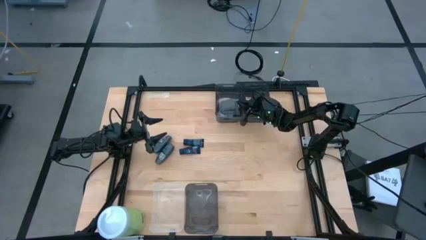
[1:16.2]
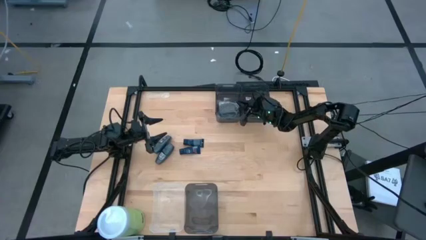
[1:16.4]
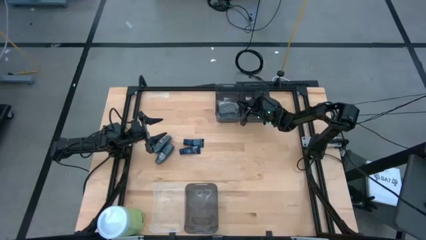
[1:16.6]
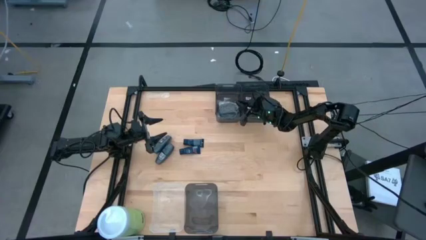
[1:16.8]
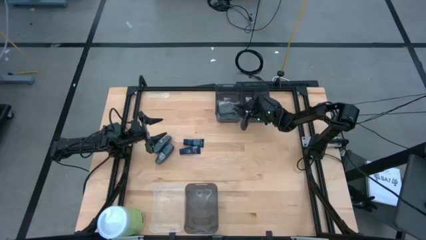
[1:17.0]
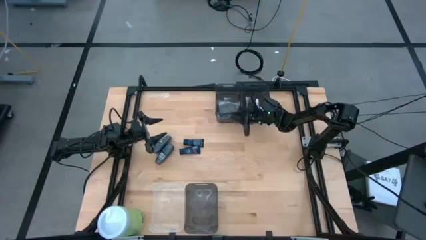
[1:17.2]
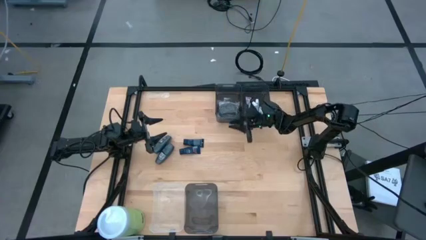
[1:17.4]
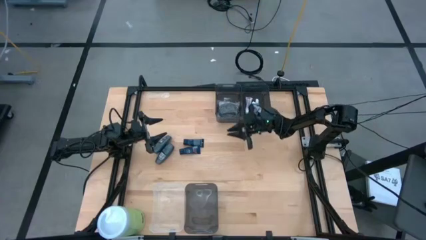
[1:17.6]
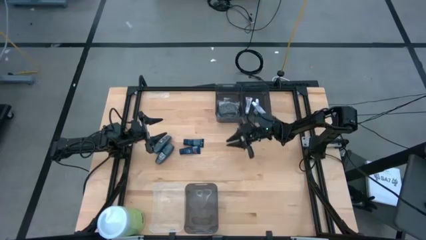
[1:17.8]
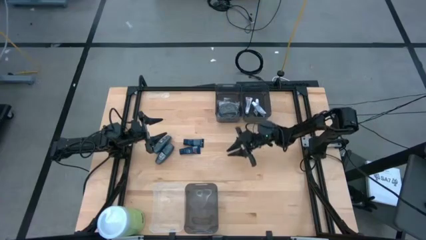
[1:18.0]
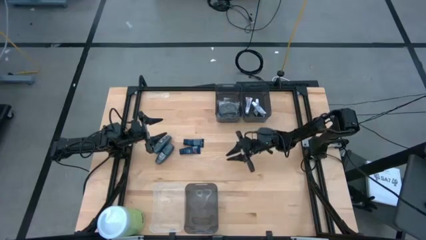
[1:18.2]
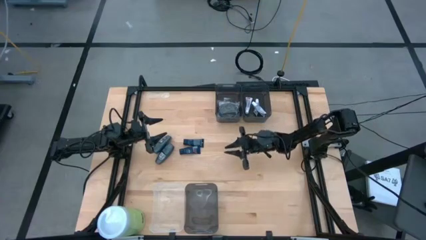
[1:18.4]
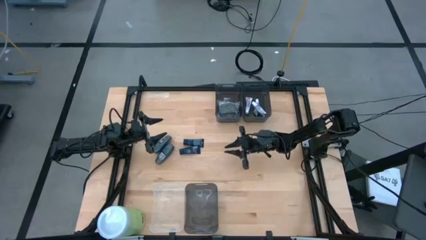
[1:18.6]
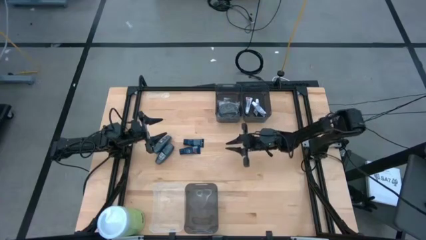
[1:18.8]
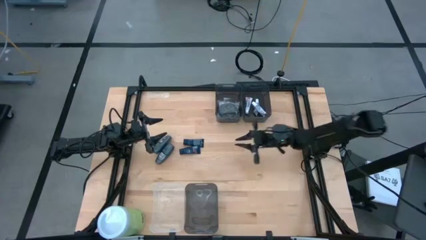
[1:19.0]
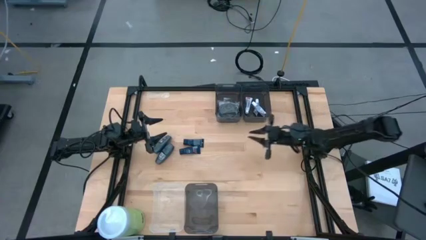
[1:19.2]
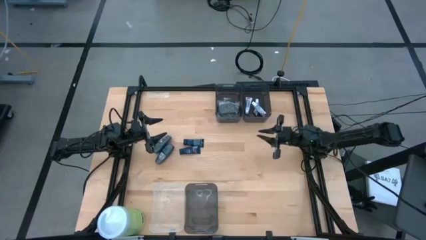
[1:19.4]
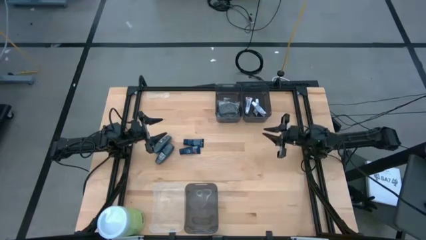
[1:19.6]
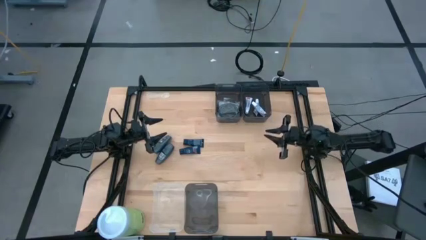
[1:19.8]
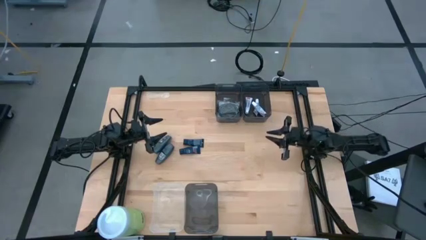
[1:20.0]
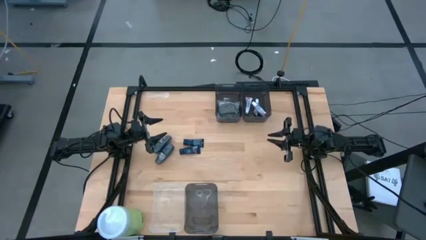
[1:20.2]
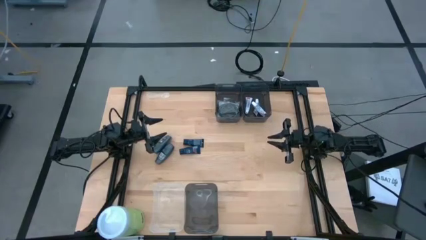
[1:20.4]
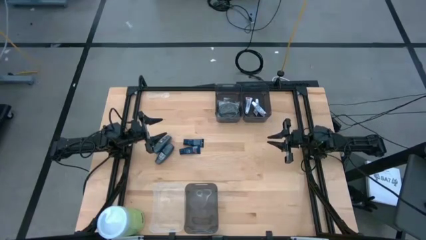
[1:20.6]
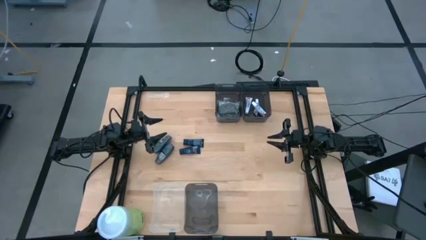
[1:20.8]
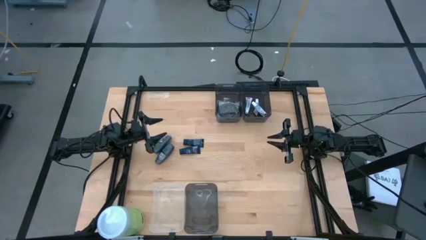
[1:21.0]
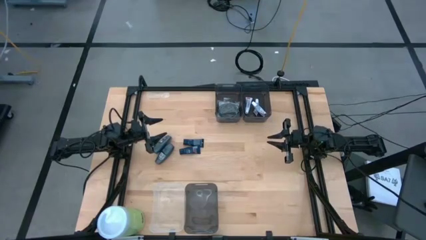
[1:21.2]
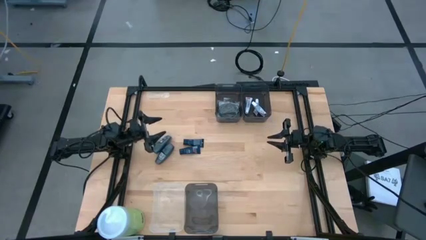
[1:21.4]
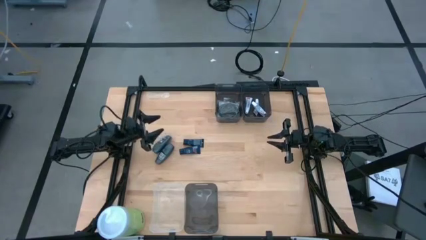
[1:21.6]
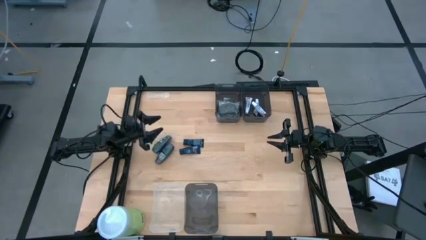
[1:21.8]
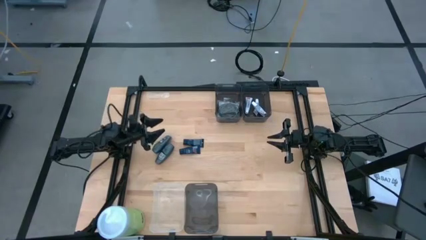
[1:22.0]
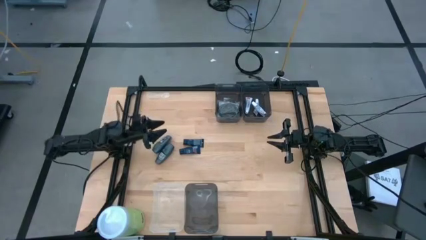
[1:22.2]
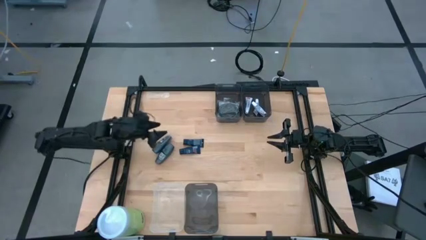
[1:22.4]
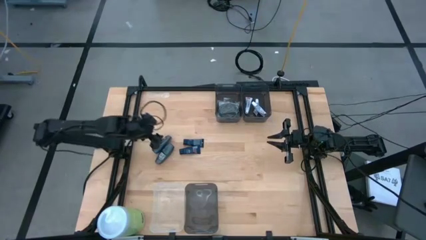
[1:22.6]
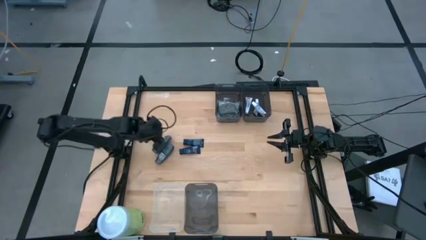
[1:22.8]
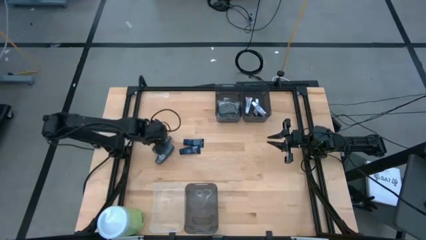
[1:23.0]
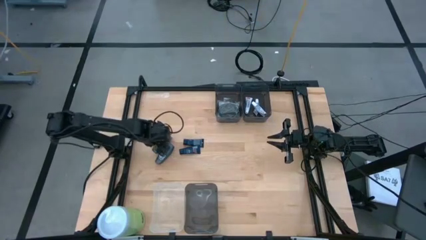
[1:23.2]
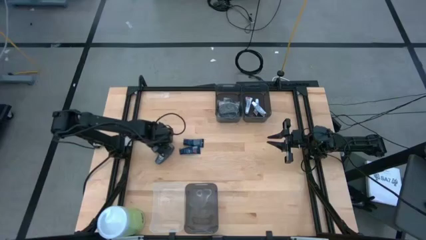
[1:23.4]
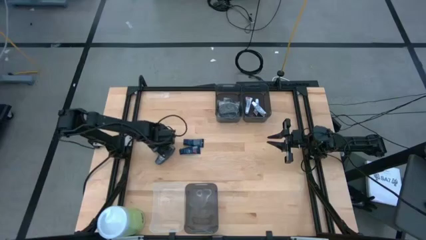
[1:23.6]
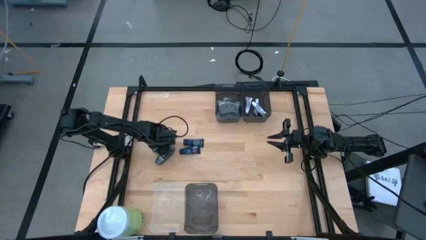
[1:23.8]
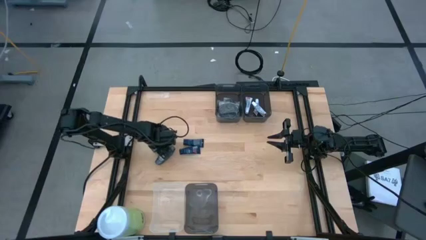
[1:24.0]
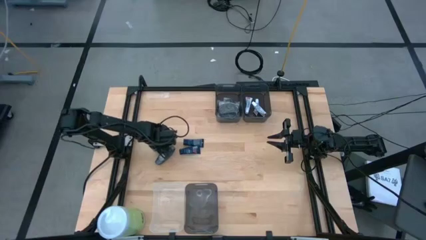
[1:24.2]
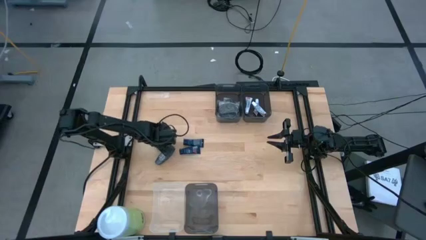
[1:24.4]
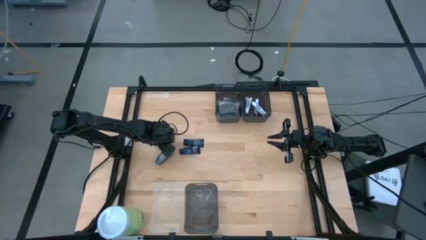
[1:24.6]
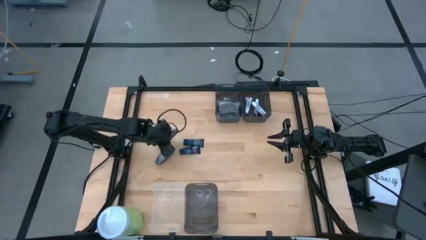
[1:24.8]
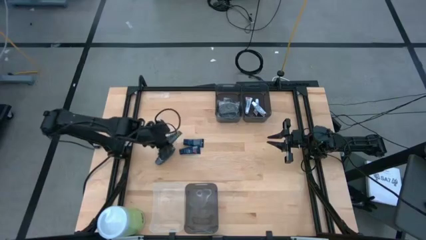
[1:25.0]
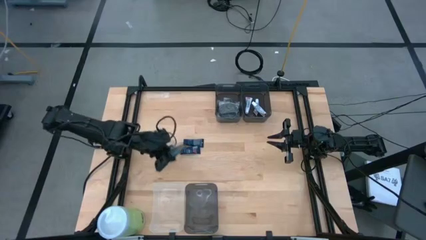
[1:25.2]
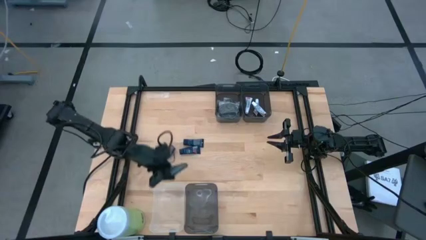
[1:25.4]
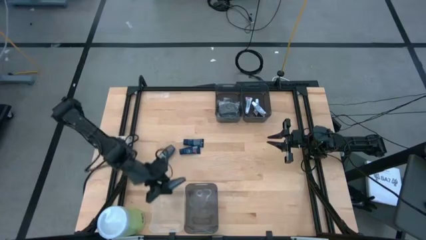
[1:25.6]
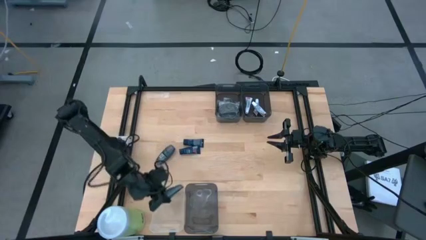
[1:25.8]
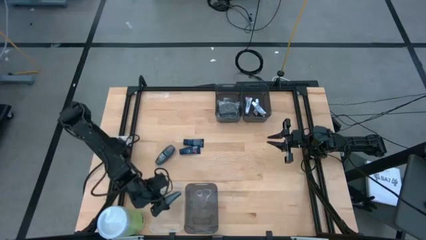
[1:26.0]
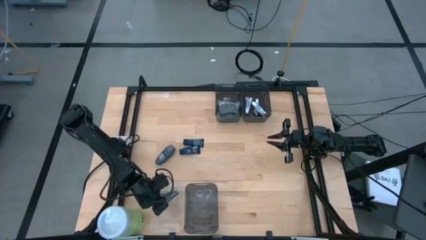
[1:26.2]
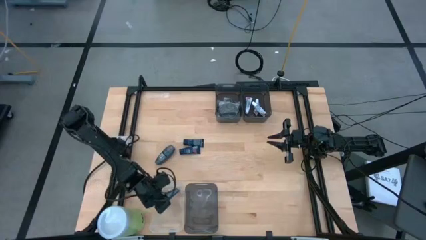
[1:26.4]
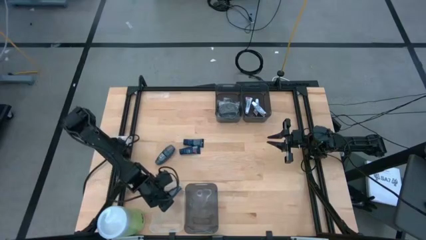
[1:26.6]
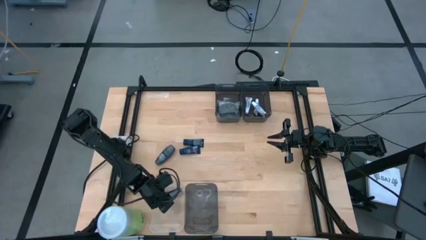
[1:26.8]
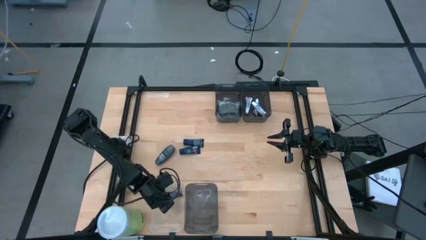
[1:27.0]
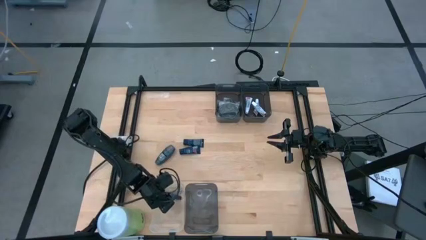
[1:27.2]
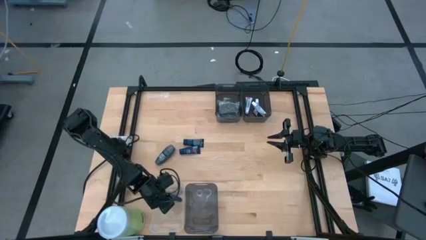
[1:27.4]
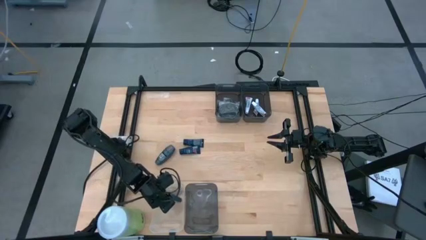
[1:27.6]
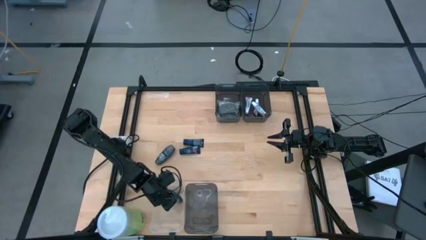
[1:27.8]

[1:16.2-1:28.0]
Task: Pick & Place Travel size toiletries
Put the top black deodorant into the transparent bin

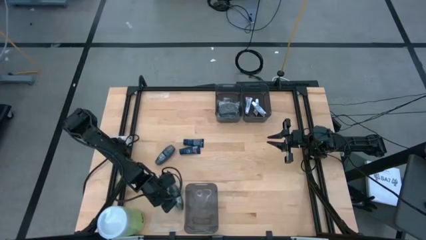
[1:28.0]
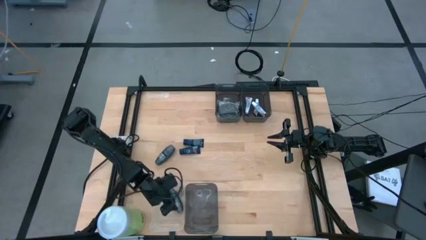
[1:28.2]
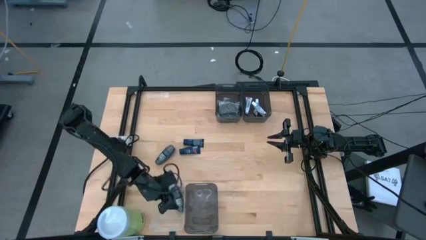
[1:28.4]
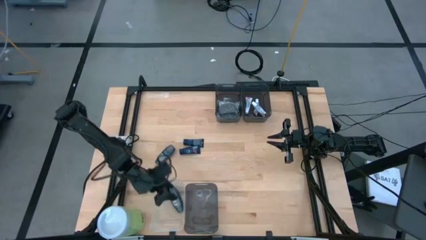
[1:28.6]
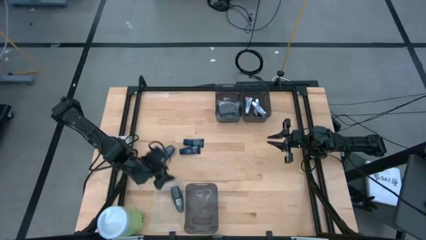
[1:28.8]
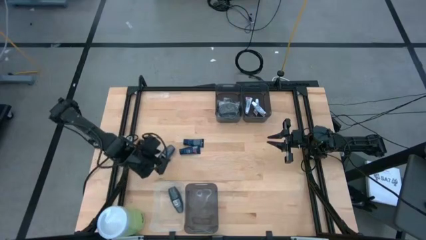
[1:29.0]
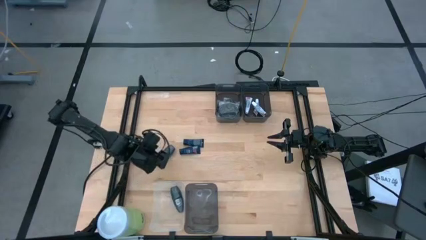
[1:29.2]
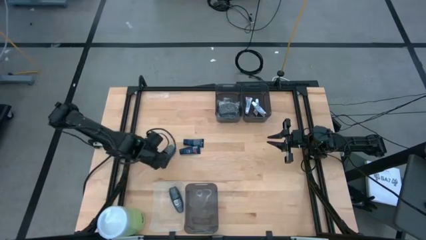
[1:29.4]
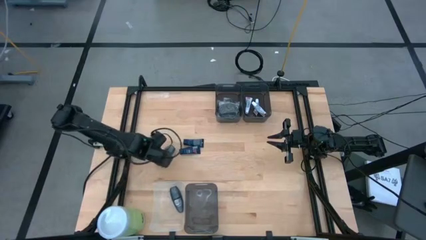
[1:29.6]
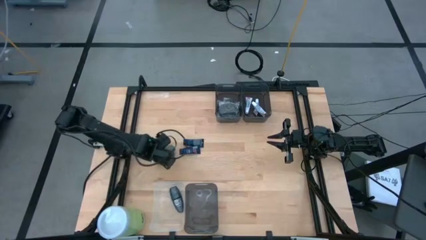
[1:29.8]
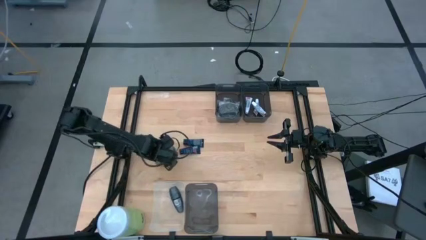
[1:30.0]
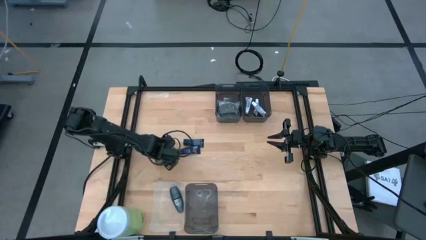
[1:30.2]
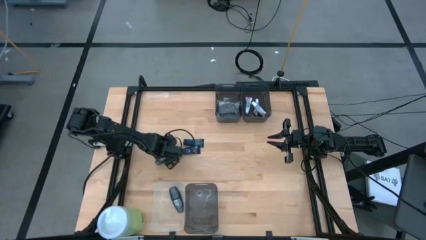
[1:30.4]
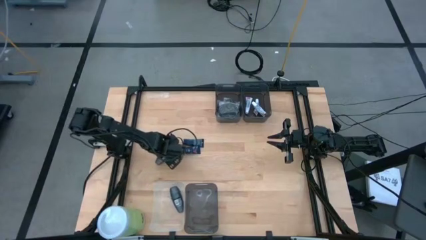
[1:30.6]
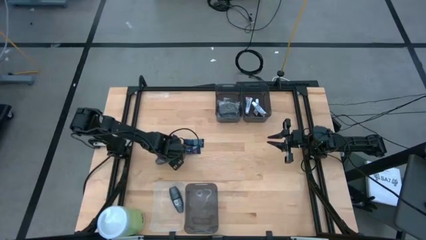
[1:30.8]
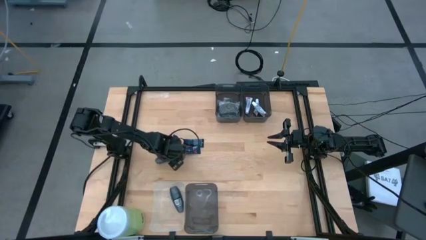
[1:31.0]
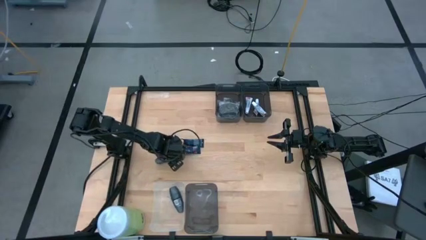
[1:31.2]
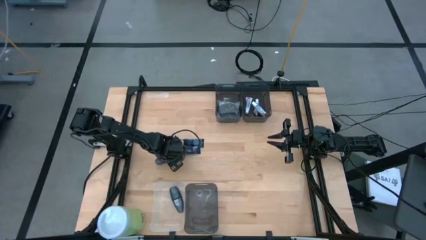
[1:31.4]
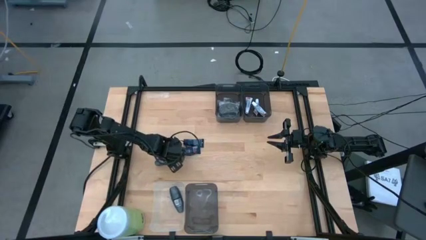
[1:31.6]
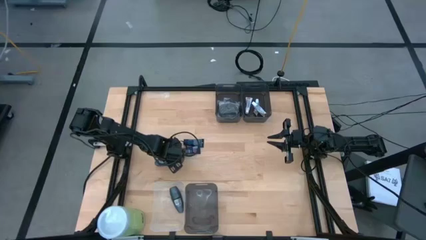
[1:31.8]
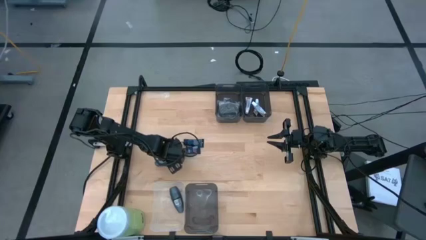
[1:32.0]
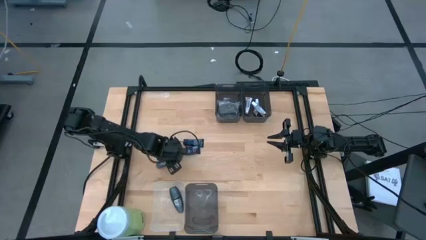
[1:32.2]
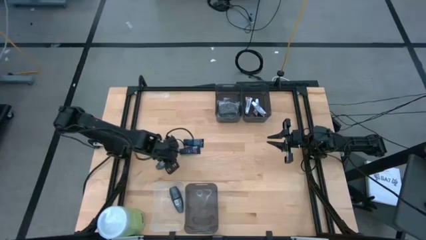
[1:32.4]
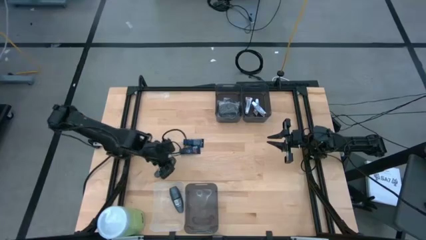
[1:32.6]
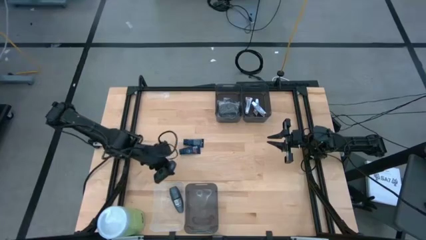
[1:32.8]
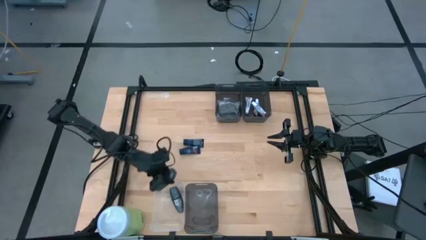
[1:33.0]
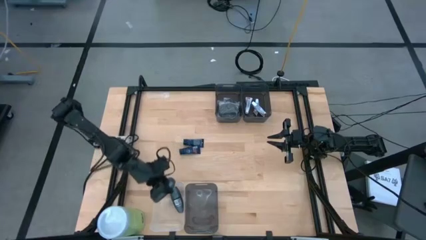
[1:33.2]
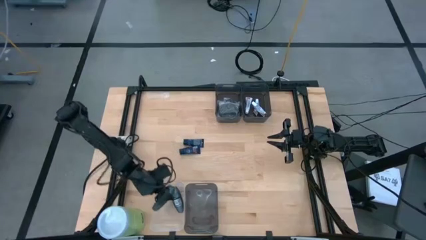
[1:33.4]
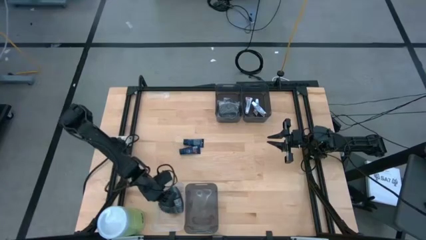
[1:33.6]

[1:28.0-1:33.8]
Put the black deodorant into the transparent bin
